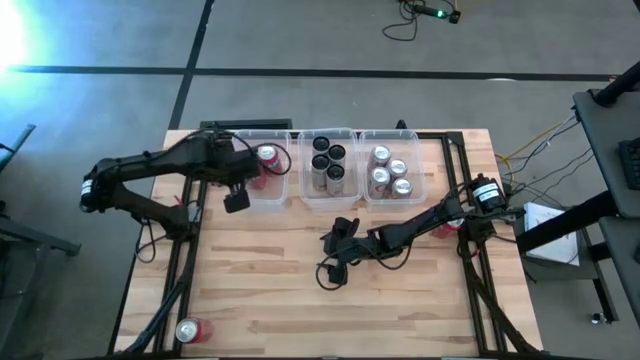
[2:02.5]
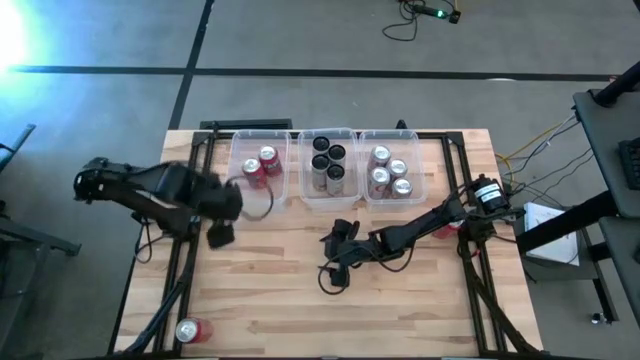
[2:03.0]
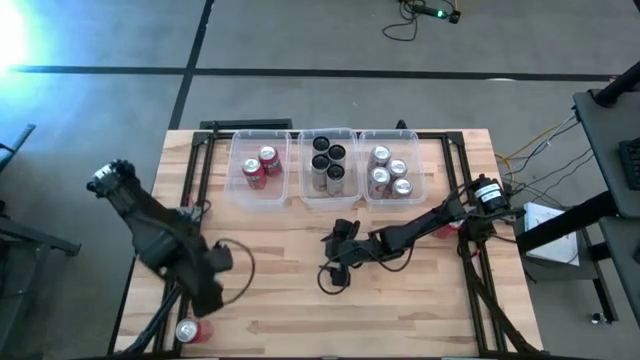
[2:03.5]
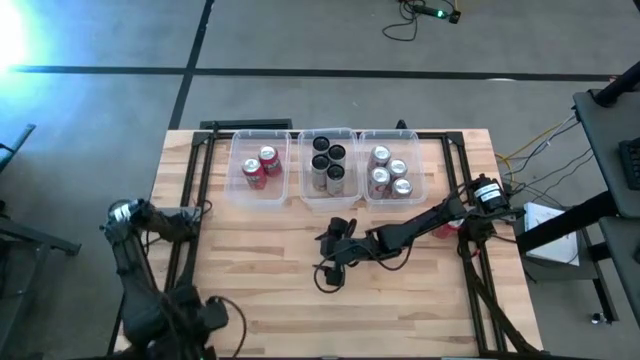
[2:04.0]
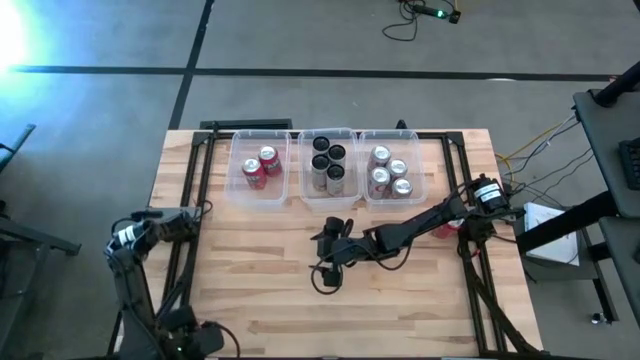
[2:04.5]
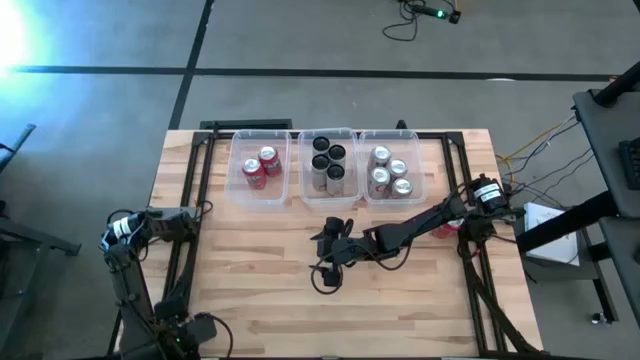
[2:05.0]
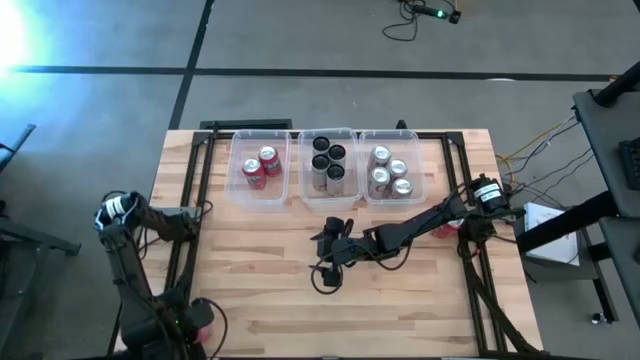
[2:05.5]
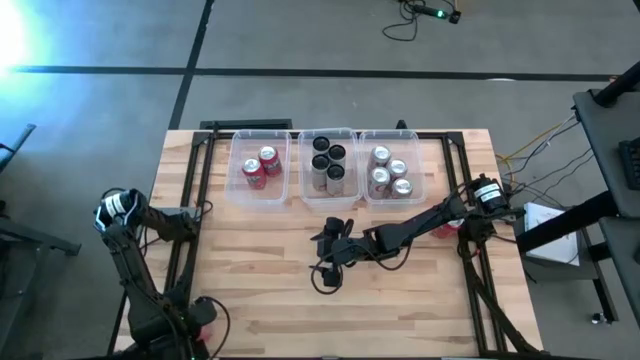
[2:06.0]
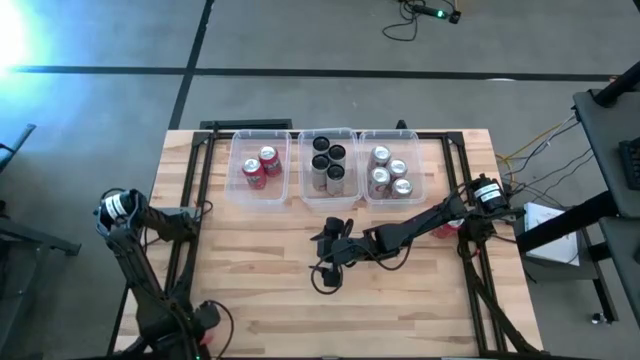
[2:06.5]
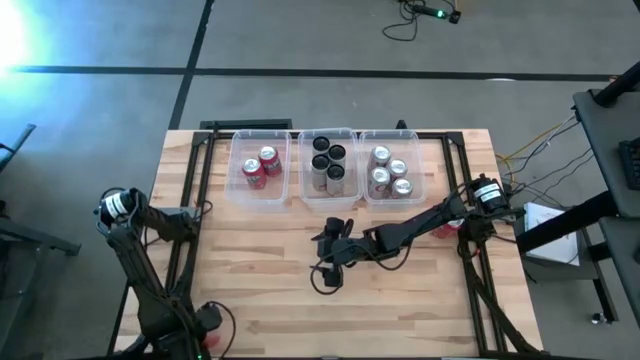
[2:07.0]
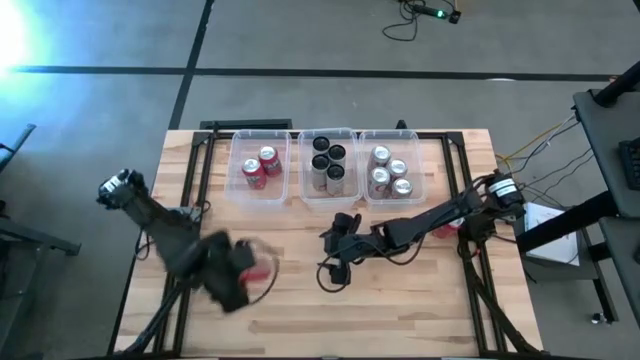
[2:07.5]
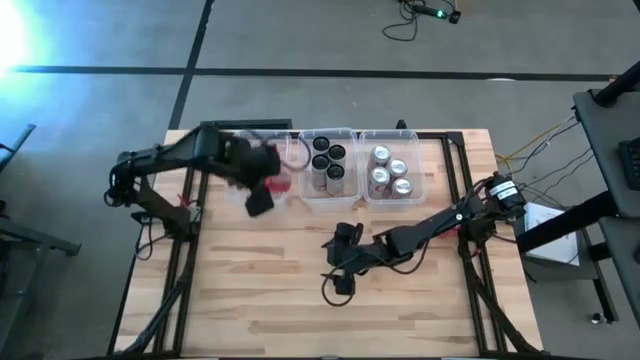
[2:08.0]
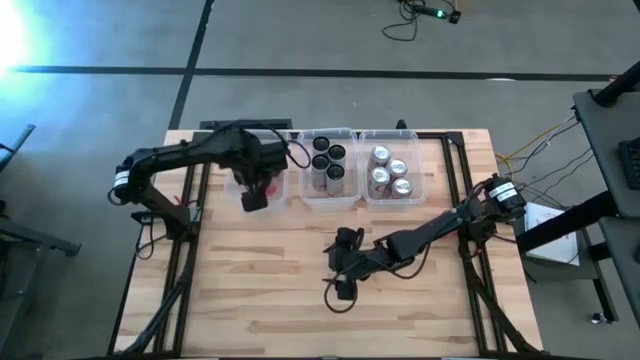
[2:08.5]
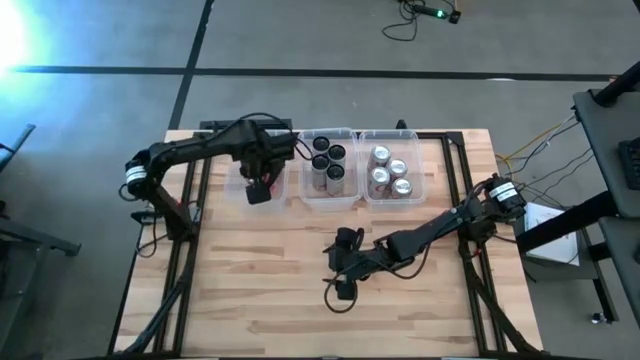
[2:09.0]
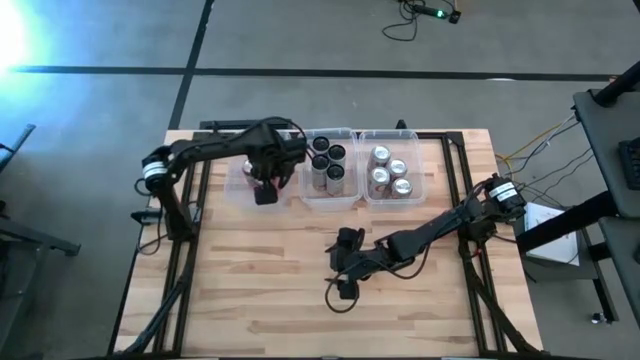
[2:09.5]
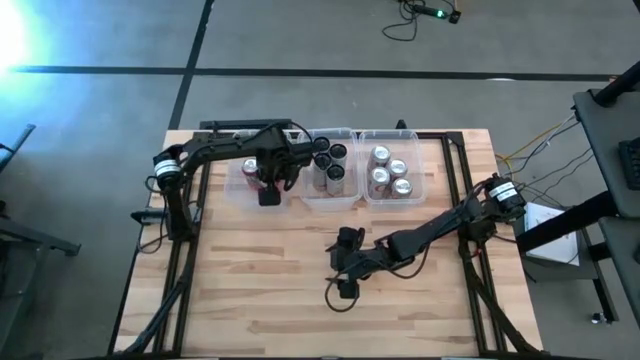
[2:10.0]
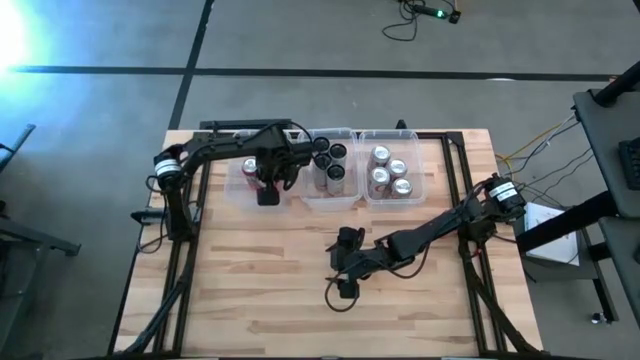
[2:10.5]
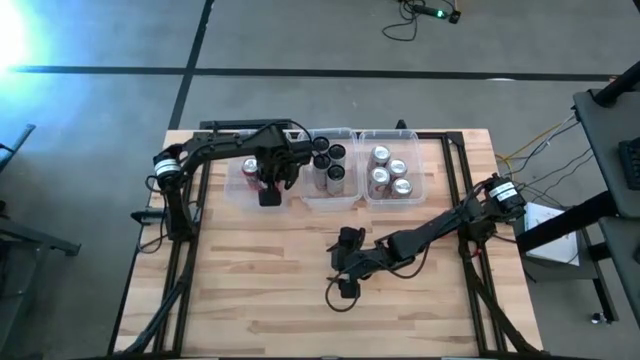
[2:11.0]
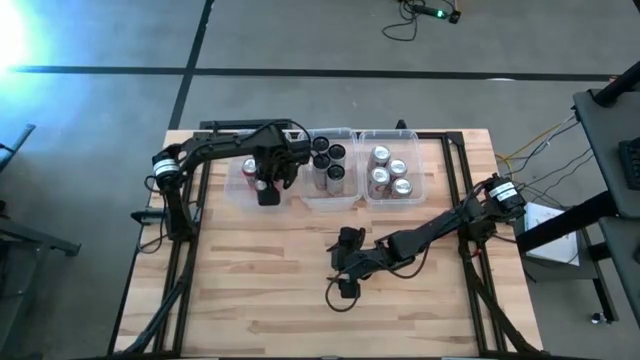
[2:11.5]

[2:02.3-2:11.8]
Task: Sort soda cans
Put the left red soda can into the left transparent bin

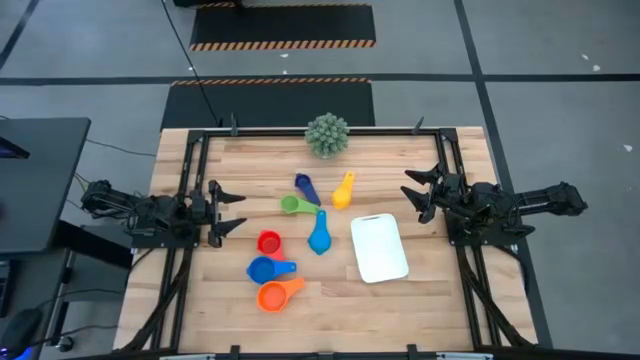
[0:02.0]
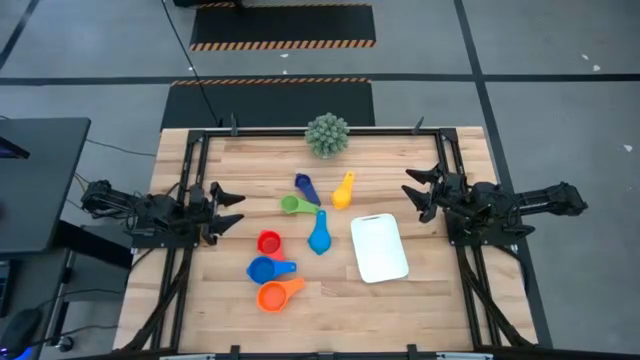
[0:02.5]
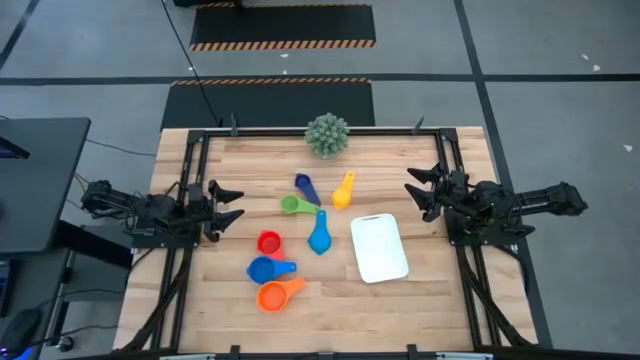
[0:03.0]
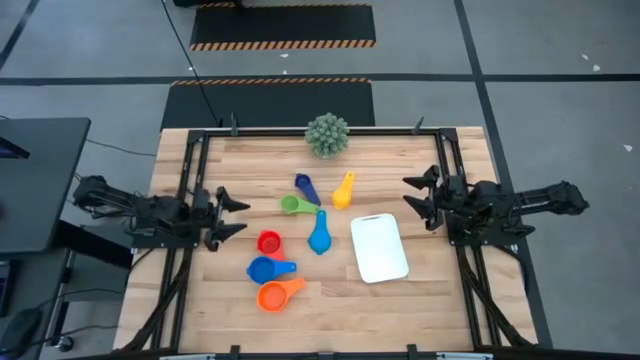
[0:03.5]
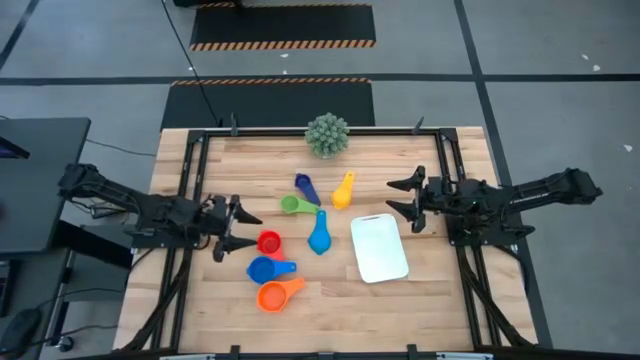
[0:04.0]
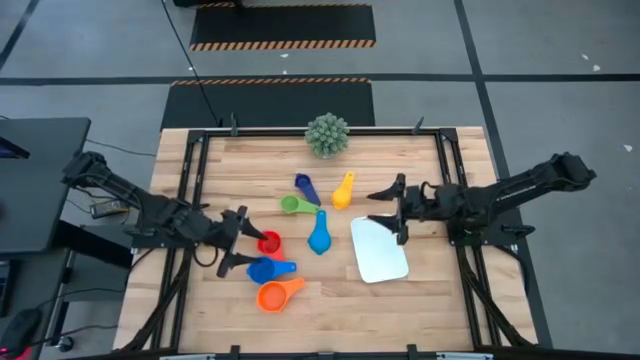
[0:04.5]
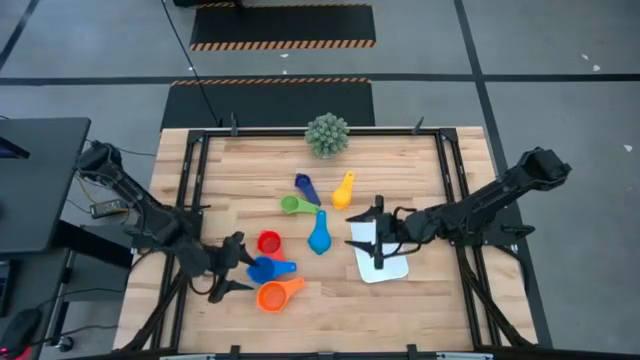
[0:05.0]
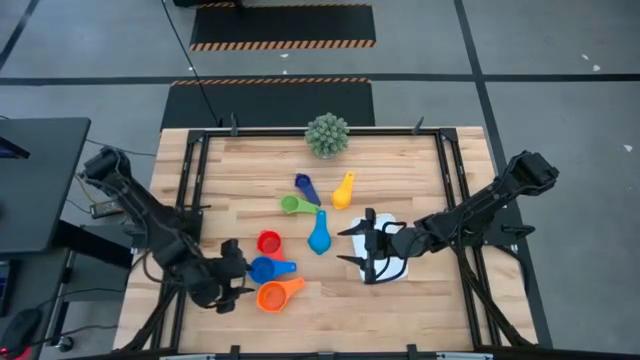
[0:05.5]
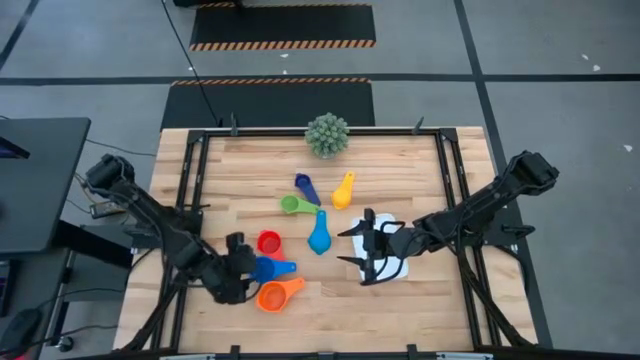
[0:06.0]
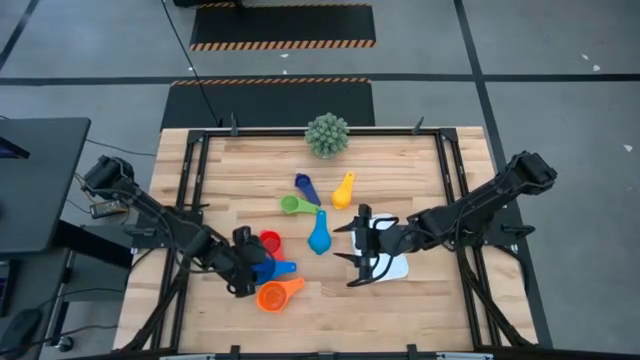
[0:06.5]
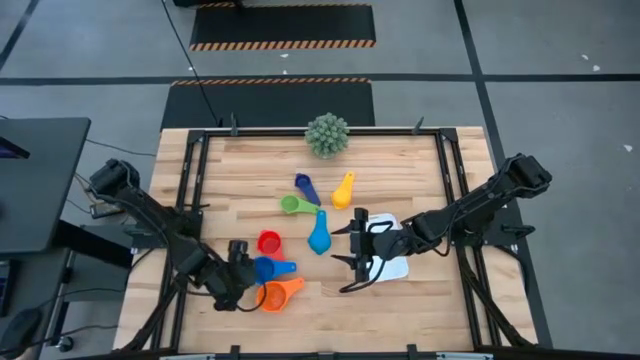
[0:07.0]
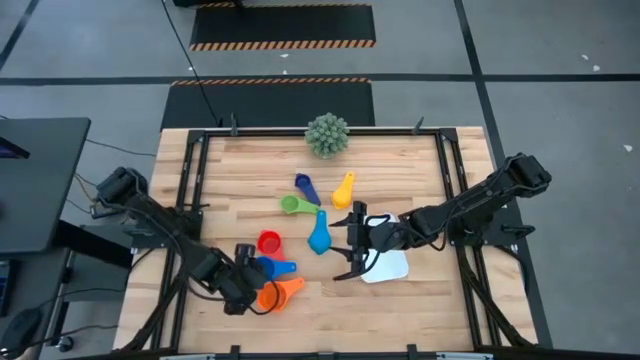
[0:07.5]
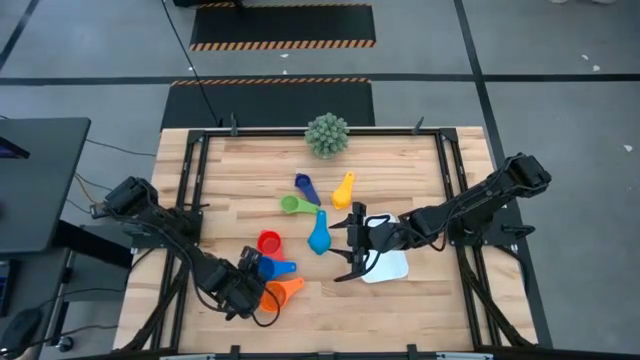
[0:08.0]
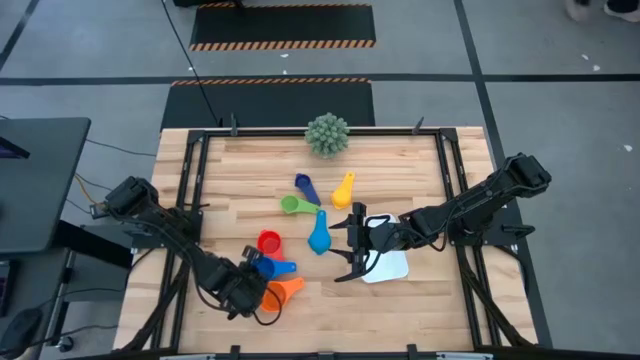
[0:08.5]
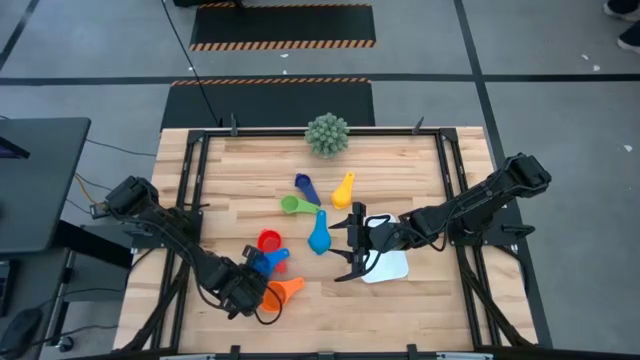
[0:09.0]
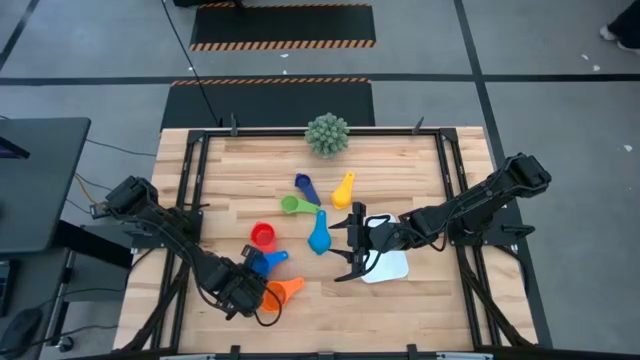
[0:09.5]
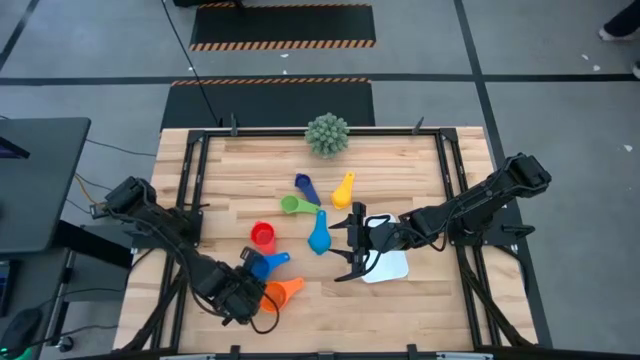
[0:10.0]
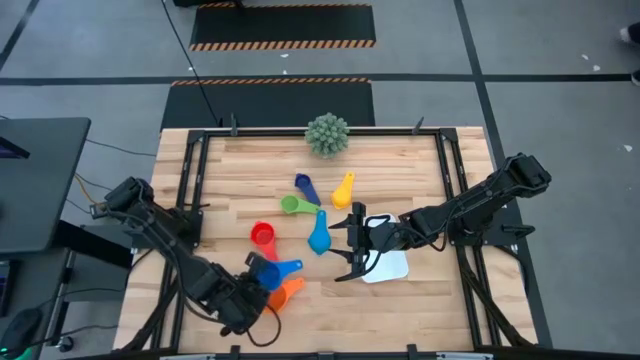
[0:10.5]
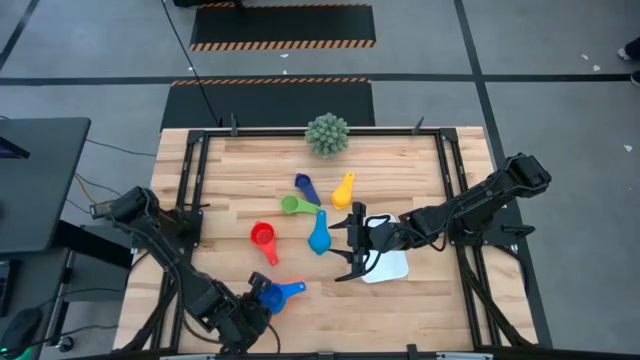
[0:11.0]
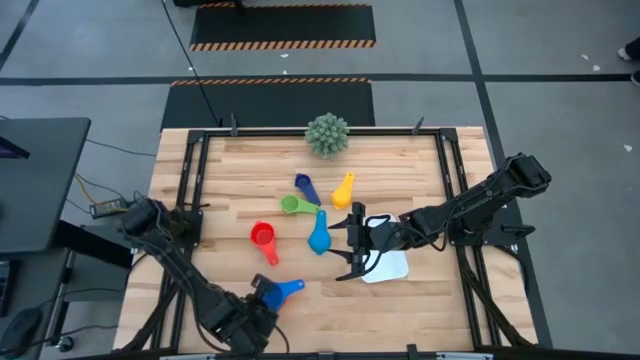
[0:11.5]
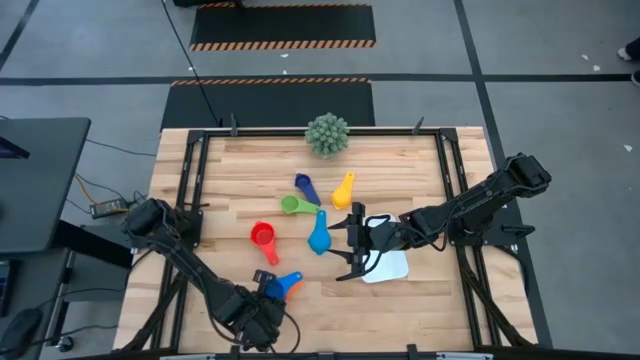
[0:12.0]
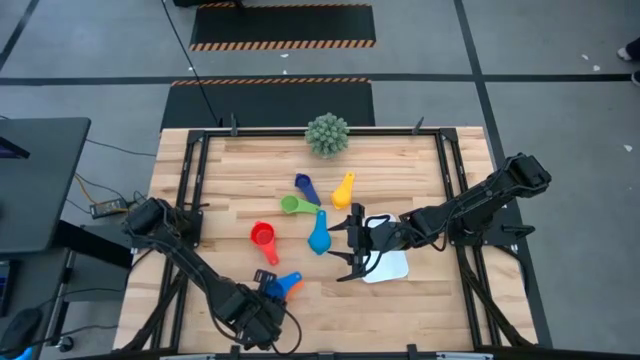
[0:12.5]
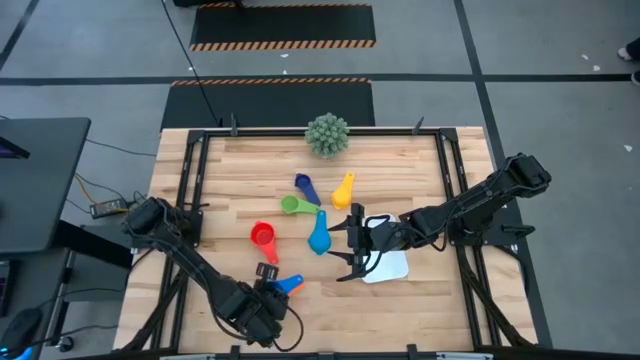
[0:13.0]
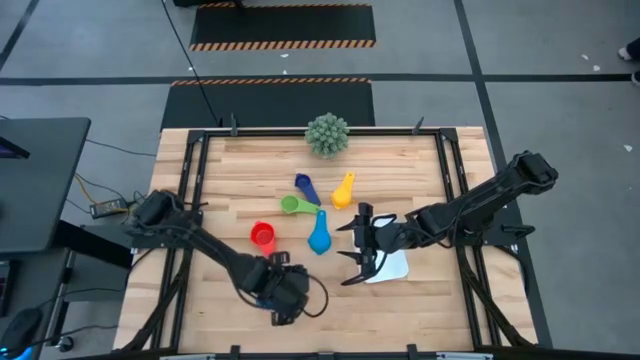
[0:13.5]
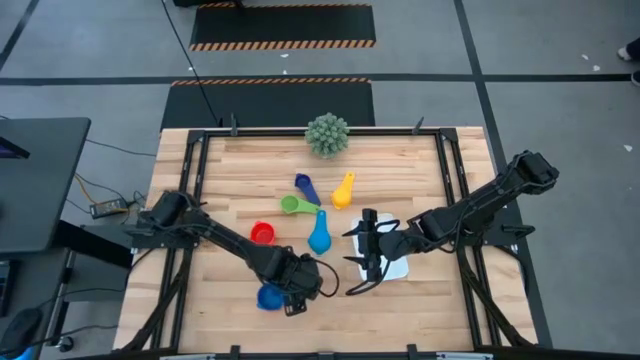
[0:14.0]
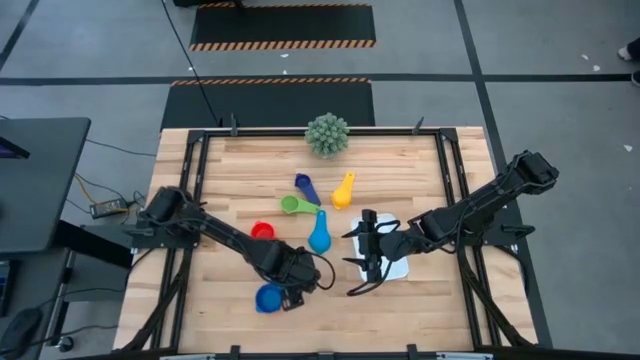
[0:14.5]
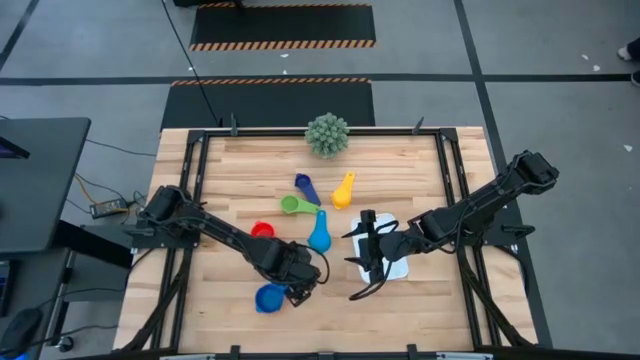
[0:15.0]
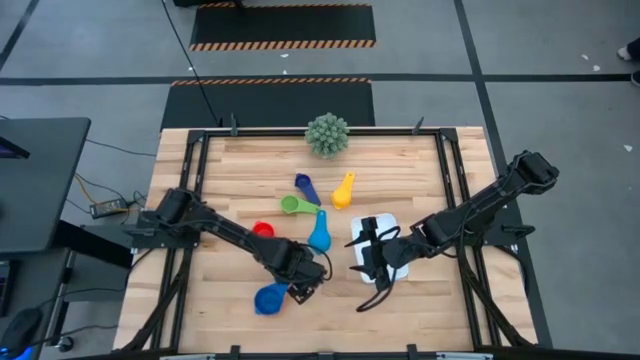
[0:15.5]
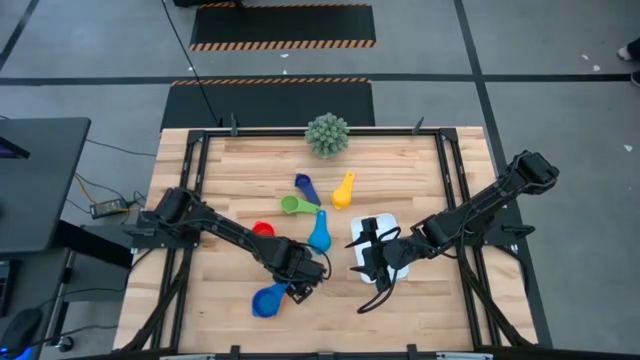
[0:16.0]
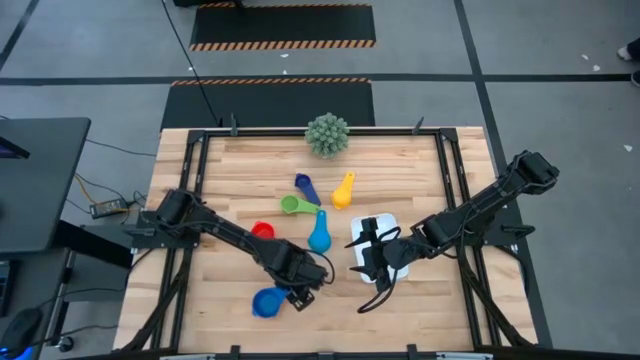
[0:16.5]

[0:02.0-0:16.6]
Task: Nest measuring cups in basket
Stack the blue measuring cup into the orange measuring cup
